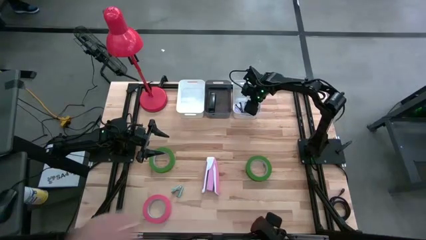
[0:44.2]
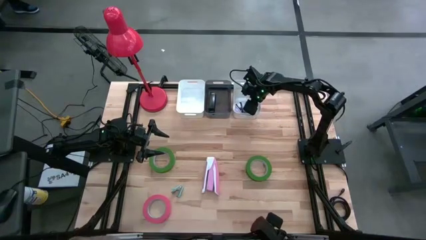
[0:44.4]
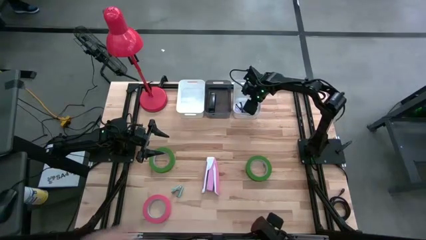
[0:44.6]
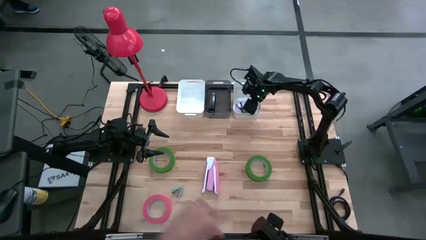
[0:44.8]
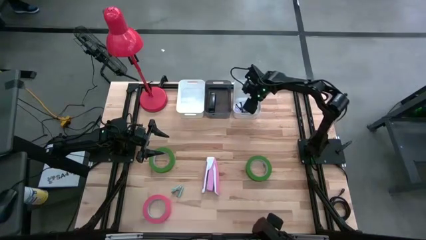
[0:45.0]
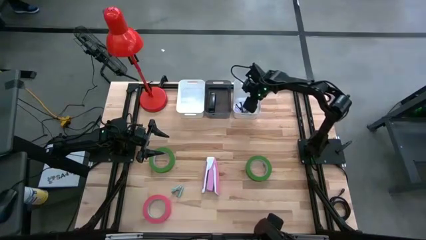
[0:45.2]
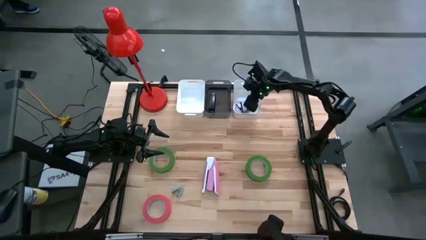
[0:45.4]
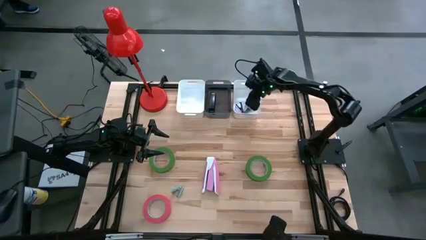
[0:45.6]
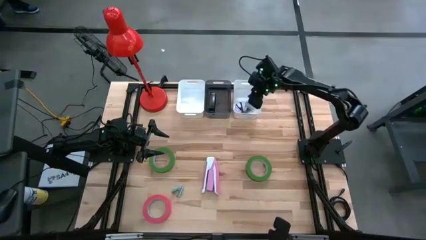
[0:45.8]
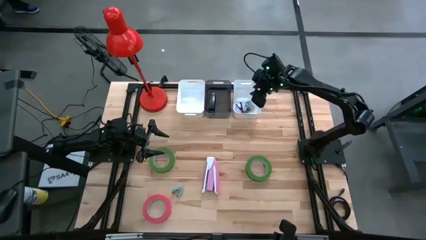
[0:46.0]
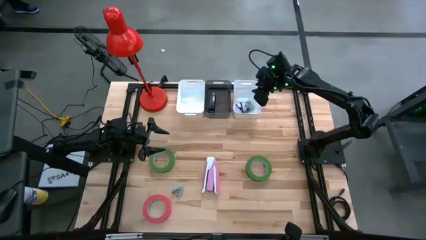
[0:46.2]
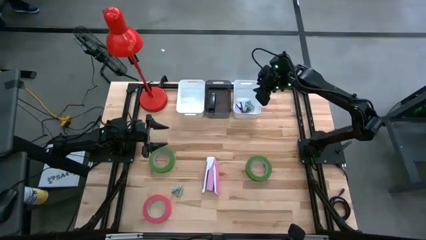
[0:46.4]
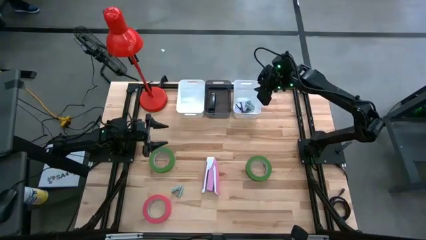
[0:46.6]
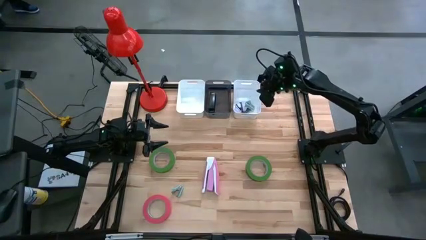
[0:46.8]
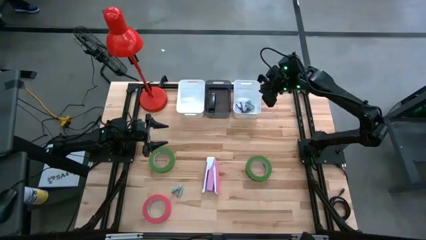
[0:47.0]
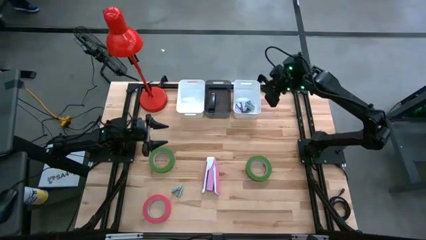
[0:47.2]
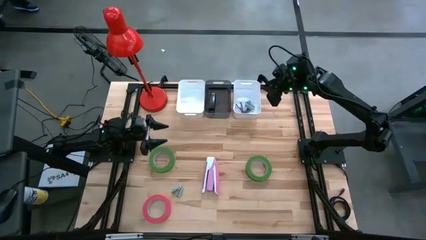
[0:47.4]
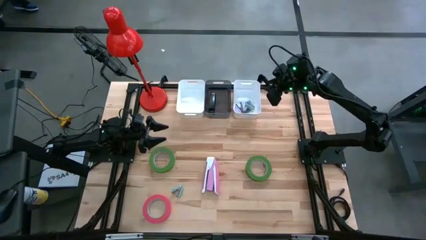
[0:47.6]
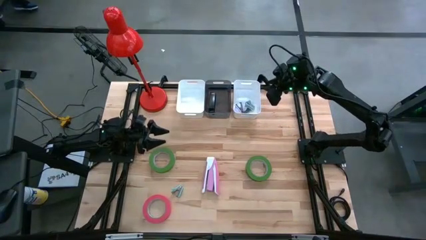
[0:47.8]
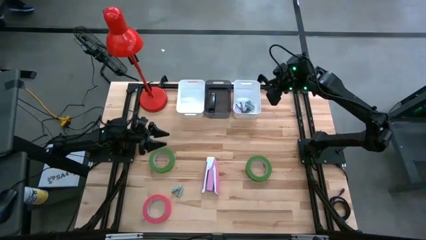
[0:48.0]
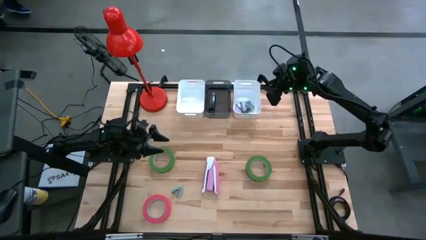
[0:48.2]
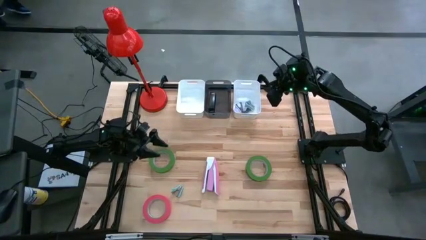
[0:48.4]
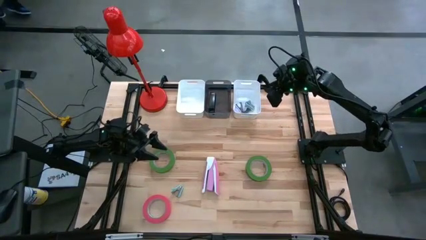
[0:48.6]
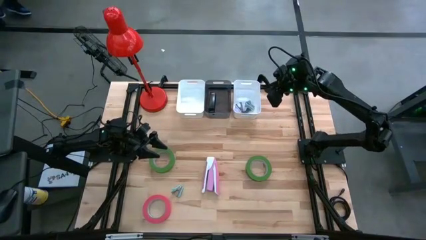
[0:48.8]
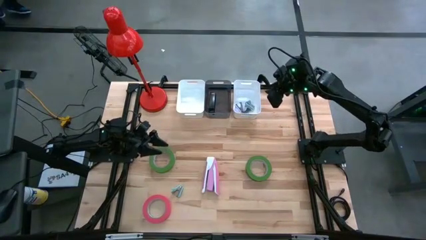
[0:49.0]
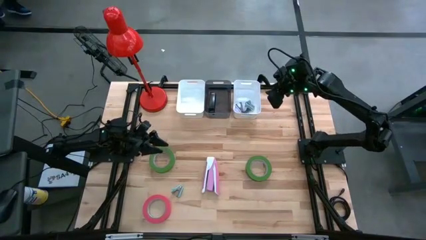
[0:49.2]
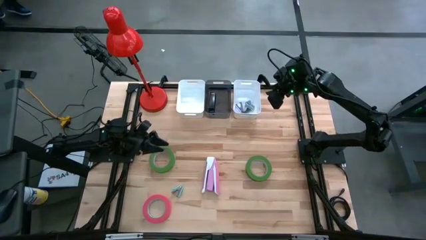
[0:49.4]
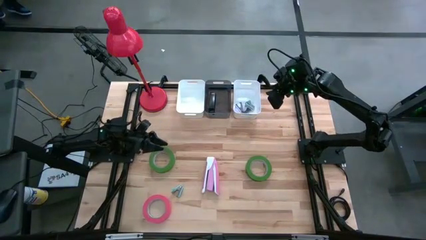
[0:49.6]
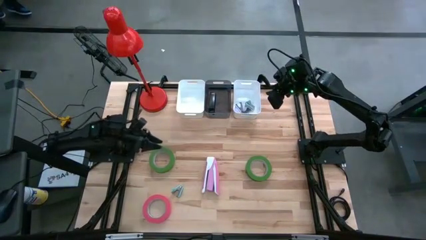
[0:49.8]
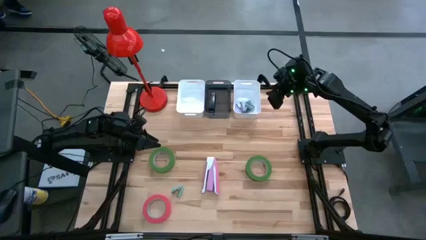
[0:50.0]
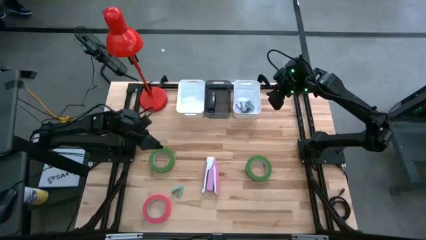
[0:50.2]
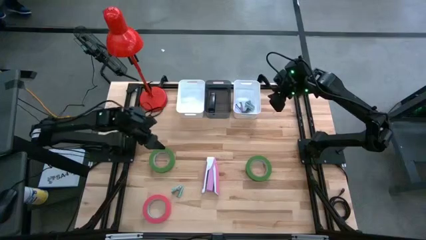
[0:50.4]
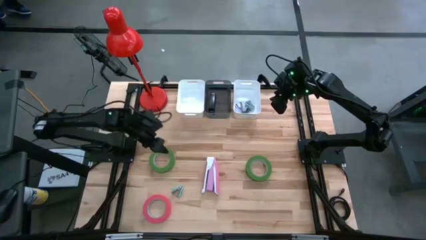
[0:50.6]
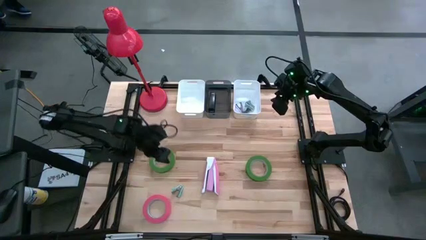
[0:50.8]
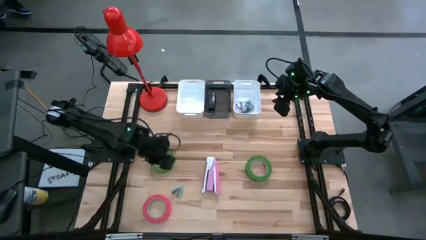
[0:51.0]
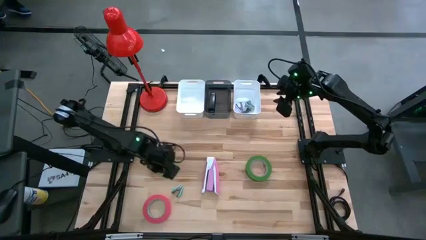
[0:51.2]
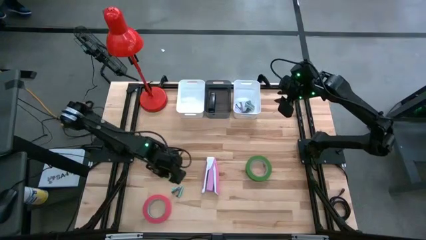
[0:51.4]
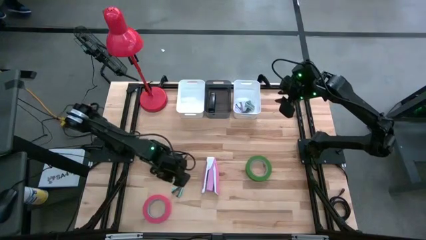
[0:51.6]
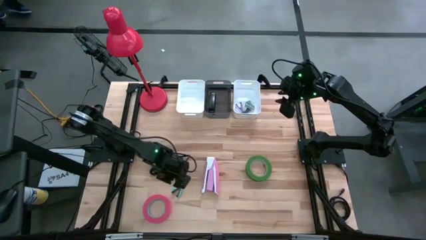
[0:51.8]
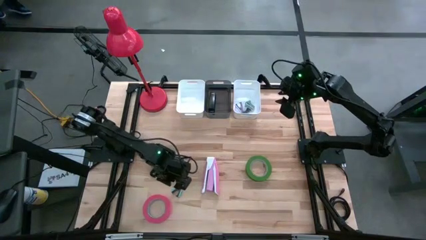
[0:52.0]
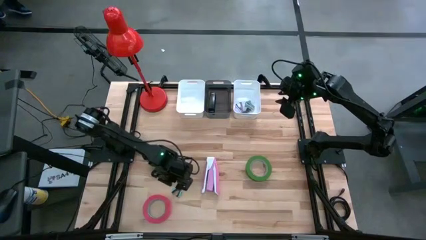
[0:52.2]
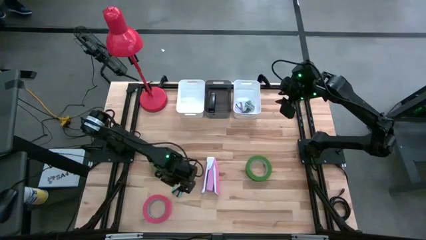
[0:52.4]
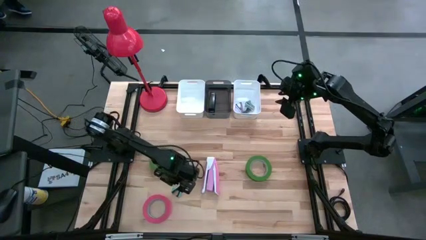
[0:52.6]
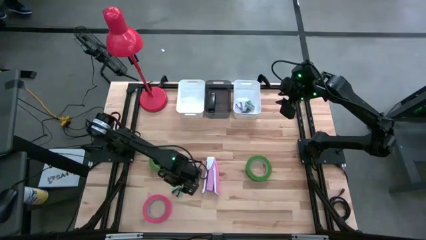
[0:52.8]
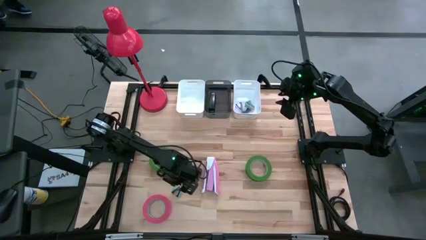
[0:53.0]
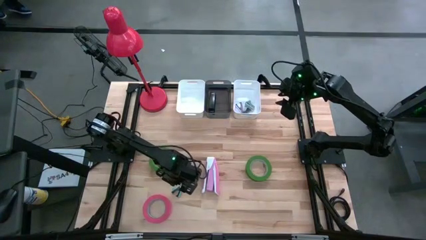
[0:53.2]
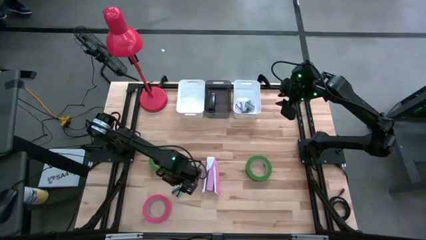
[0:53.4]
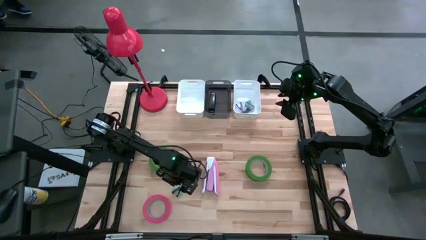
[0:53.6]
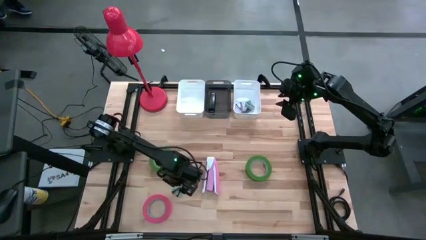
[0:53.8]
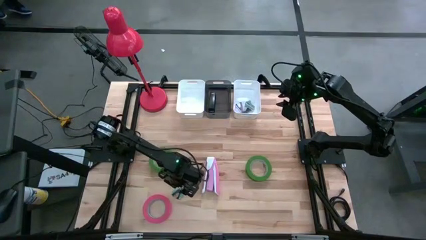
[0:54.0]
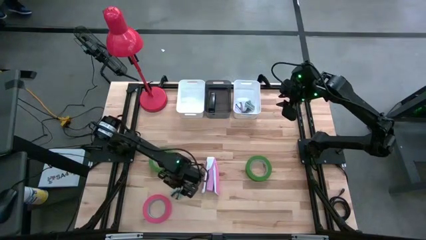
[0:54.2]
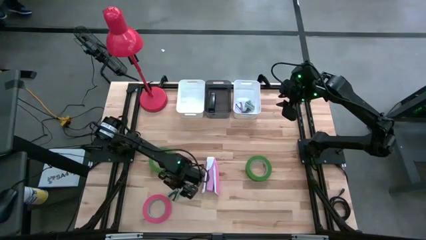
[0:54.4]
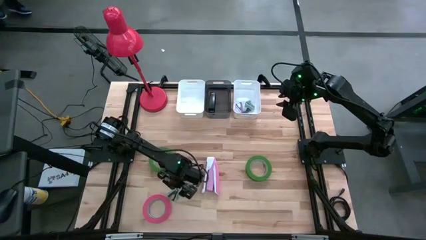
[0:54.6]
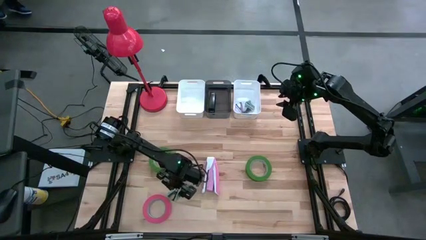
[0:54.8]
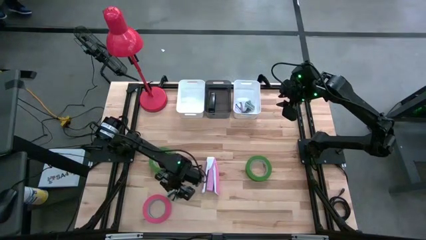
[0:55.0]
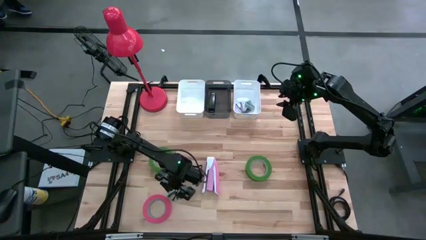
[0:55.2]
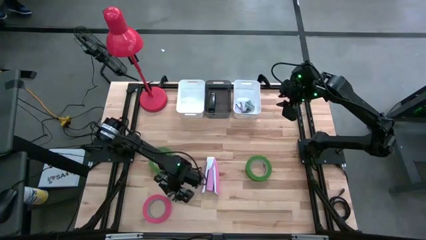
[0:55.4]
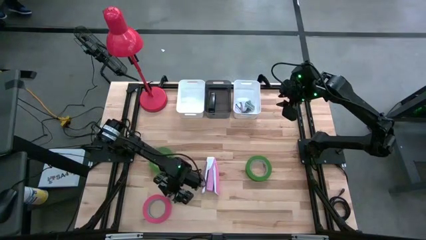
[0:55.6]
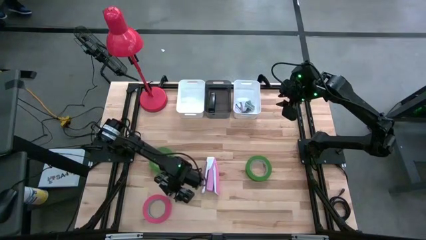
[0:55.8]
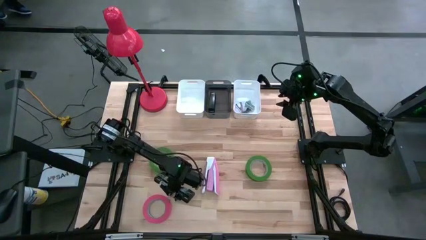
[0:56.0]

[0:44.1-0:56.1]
Task: Pick and place Stapler, Stapler remover, tape
Put the light blue staple into the right white bin
